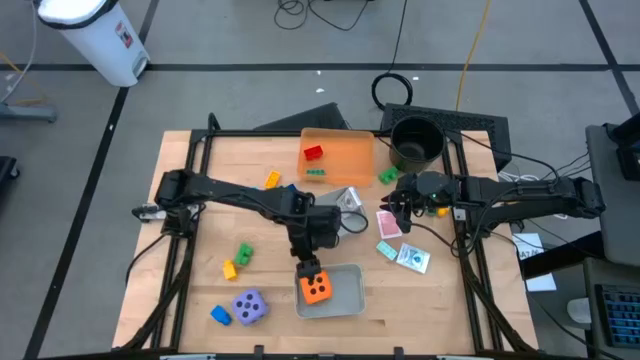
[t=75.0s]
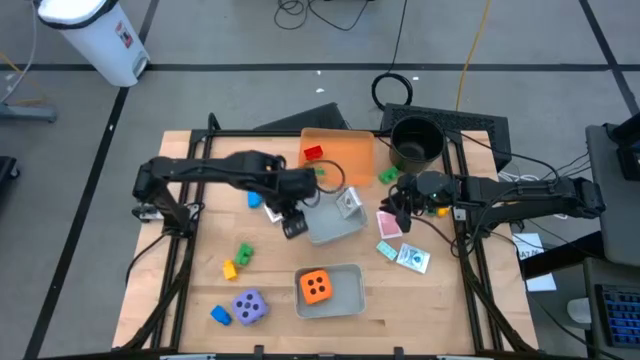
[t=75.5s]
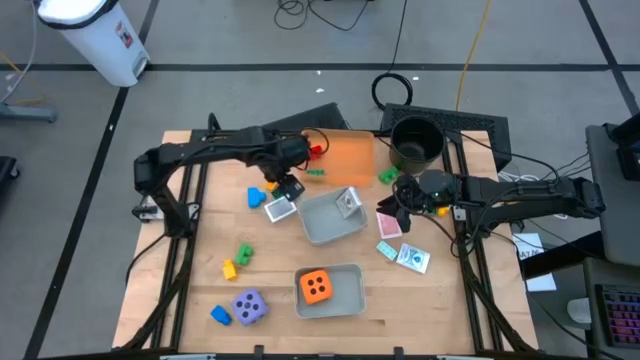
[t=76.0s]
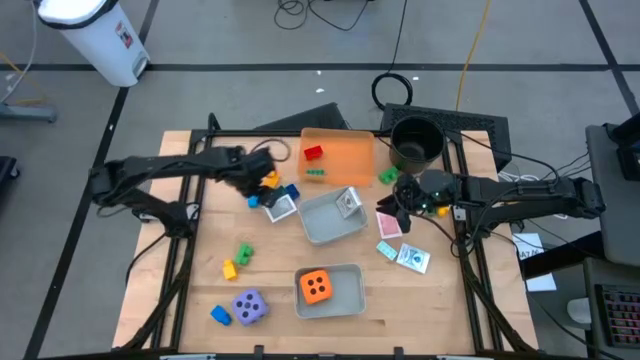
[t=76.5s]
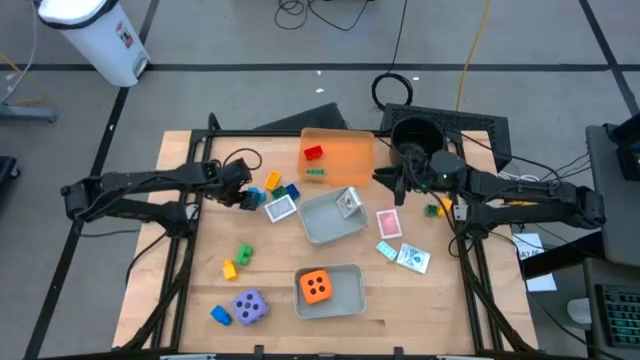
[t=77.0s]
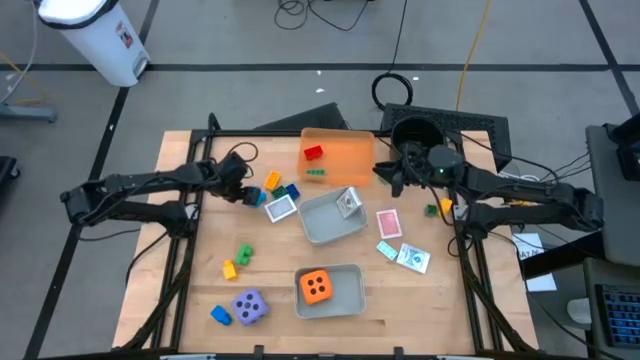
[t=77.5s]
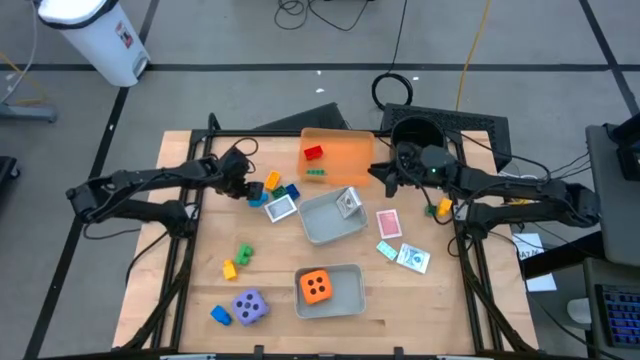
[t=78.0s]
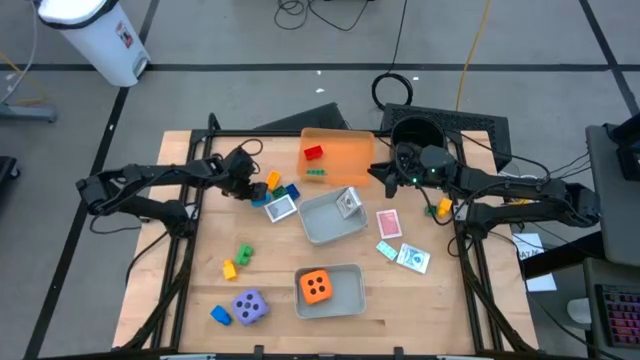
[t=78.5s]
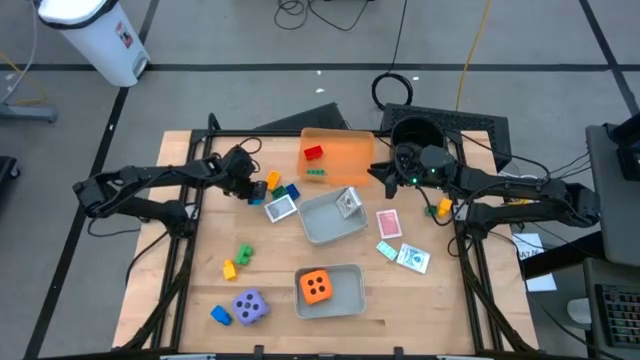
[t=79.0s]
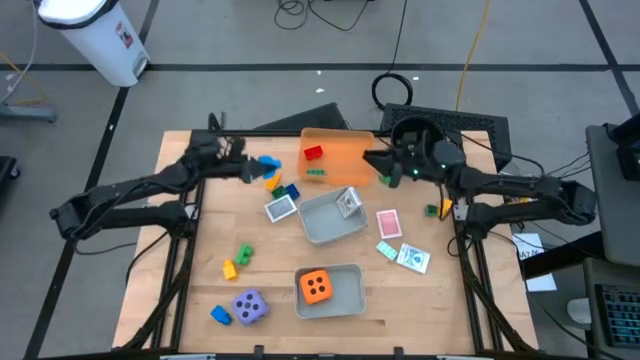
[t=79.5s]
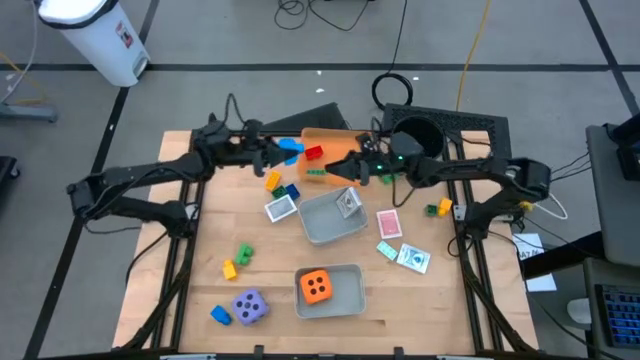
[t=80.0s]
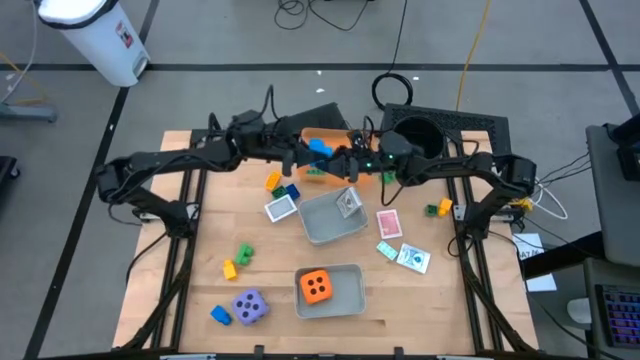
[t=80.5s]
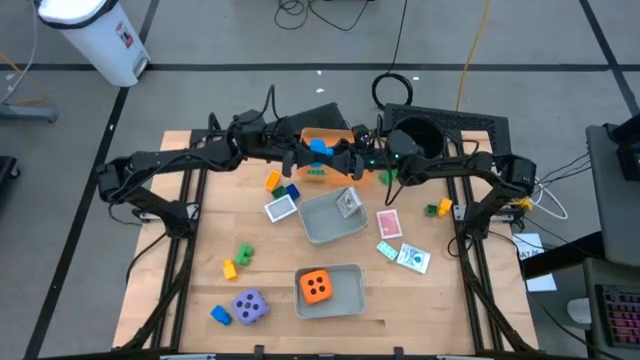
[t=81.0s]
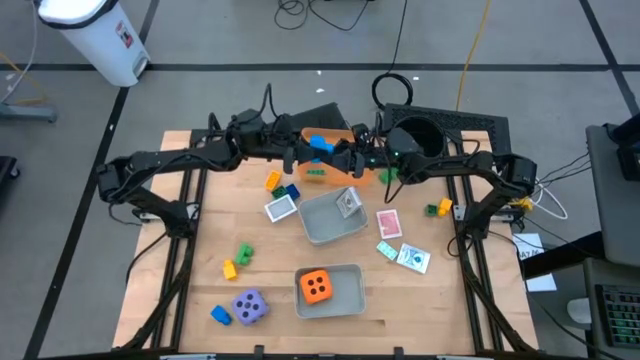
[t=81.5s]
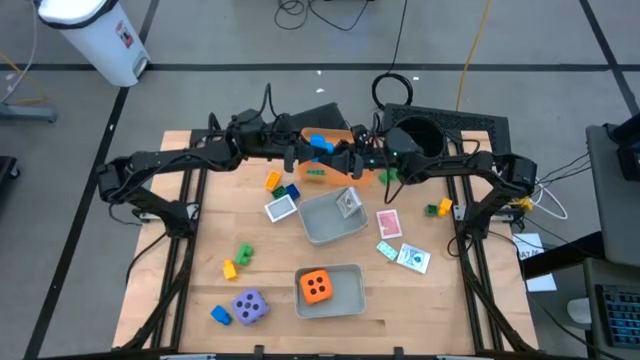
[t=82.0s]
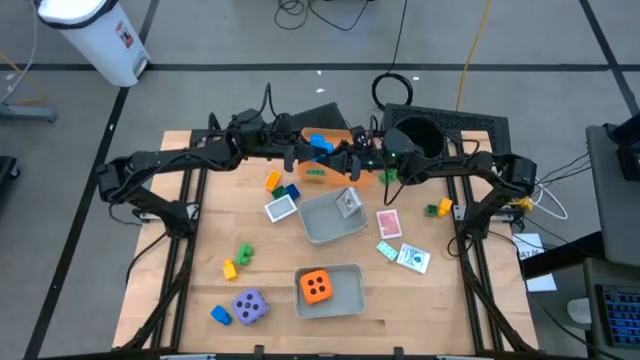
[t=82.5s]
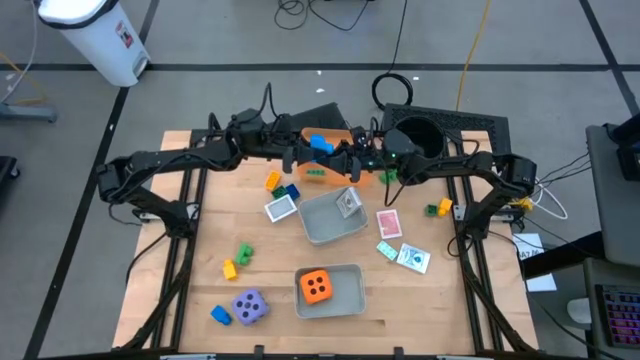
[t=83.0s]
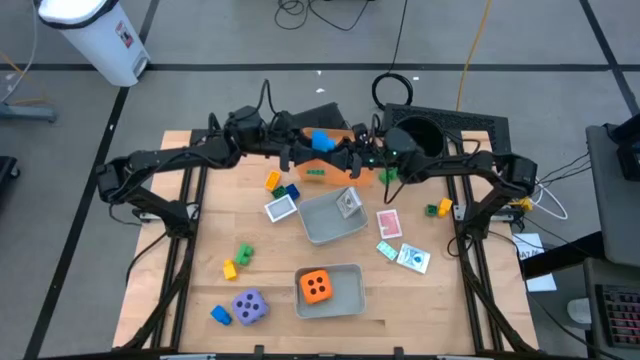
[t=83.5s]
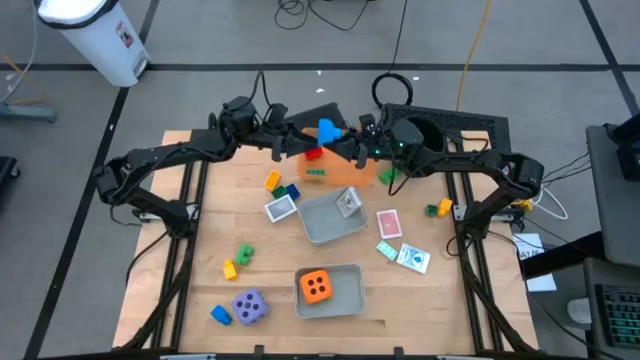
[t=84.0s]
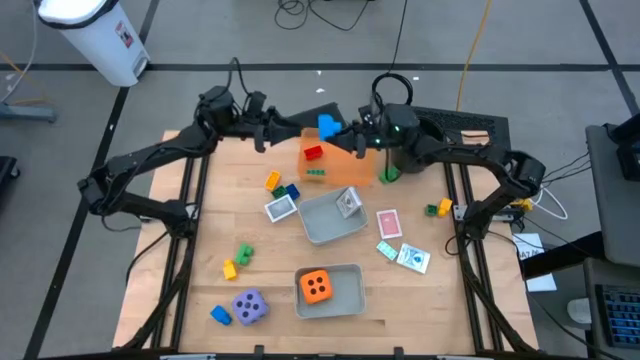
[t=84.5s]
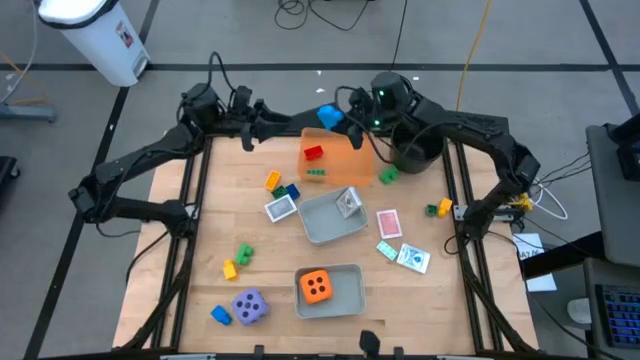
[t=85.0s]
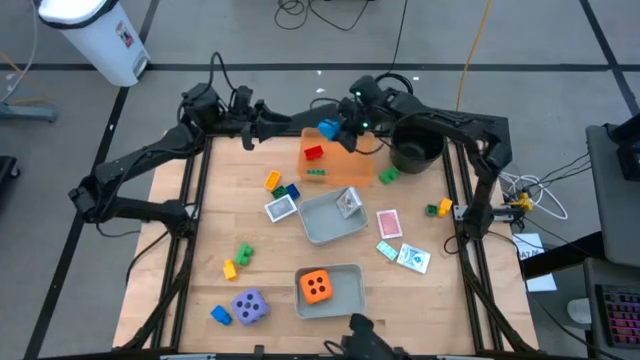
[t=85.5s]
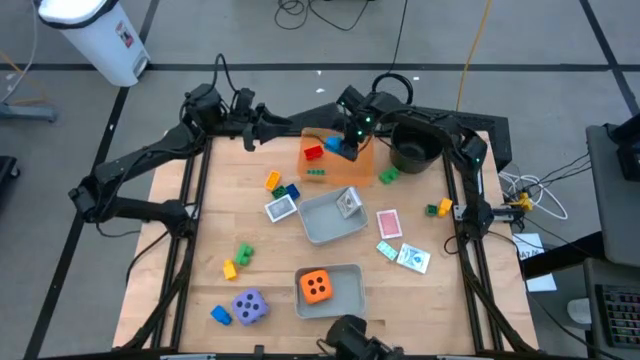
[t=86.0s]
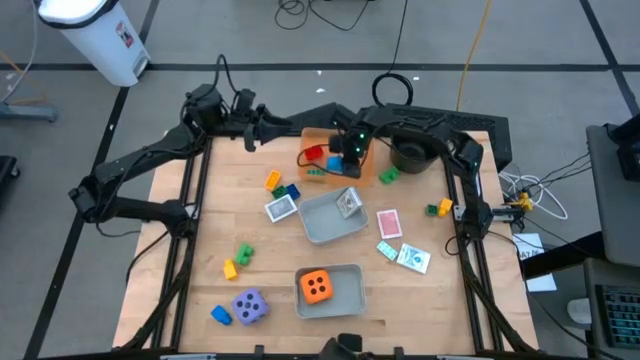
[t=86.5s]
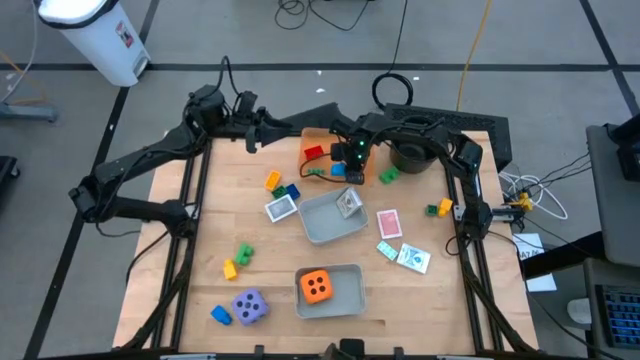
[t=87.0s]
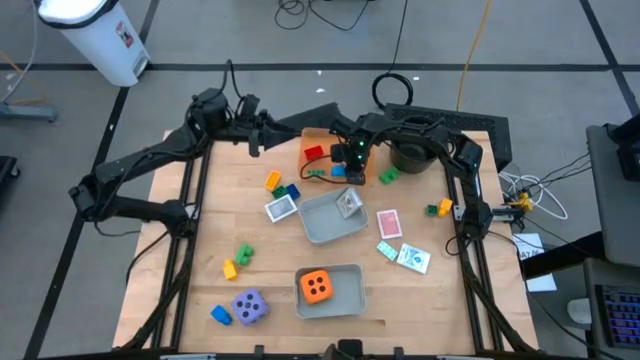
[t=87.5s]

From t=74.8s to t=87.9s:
Task: Pick & Place Toys
Put the blue game piece into the orange bin

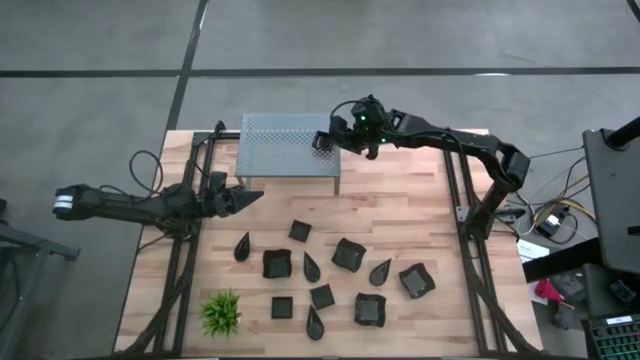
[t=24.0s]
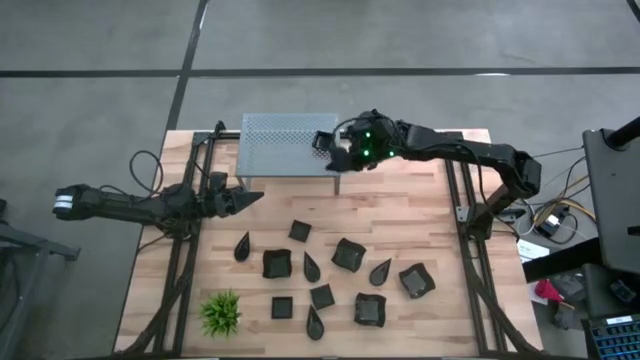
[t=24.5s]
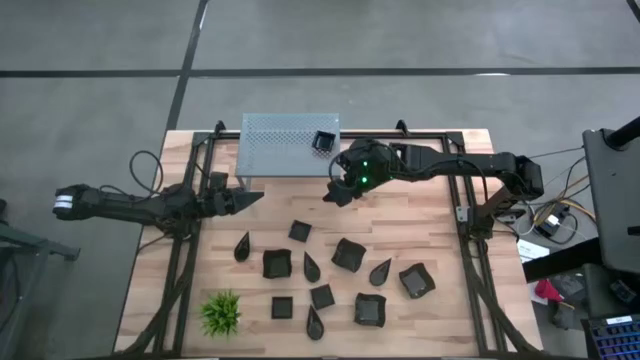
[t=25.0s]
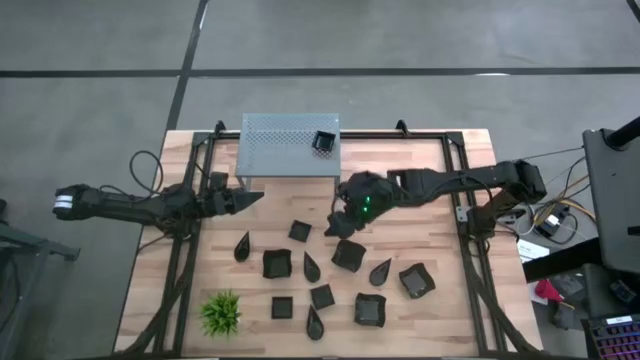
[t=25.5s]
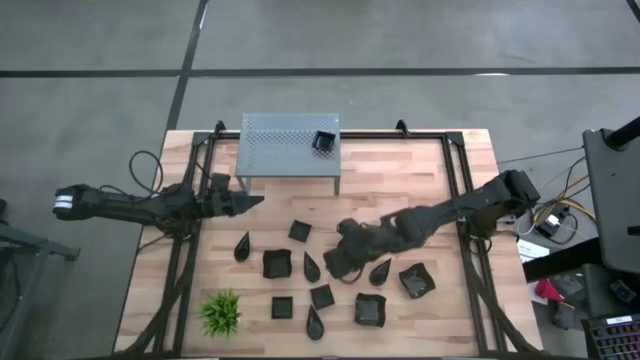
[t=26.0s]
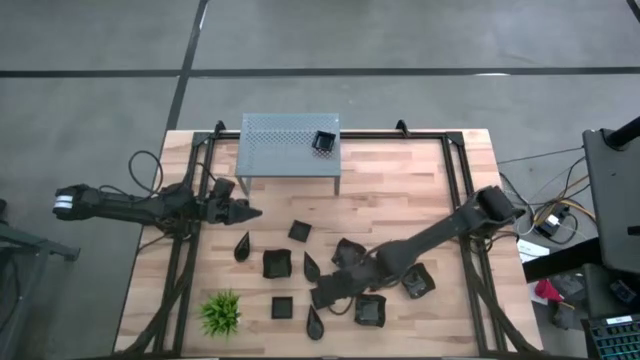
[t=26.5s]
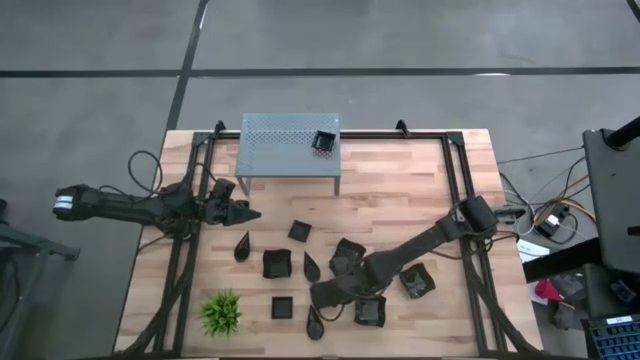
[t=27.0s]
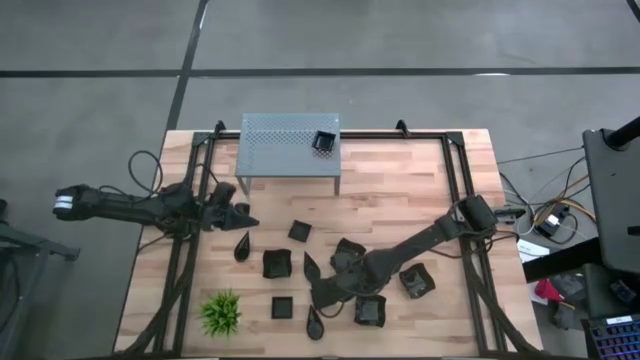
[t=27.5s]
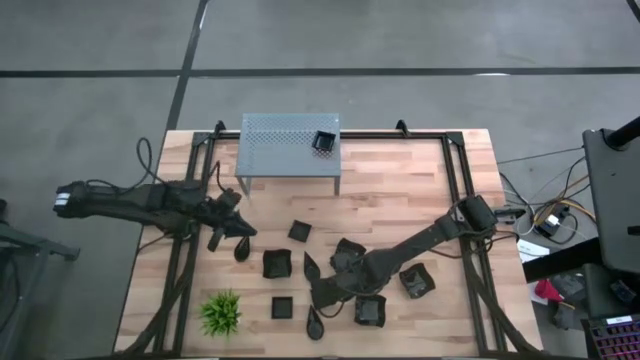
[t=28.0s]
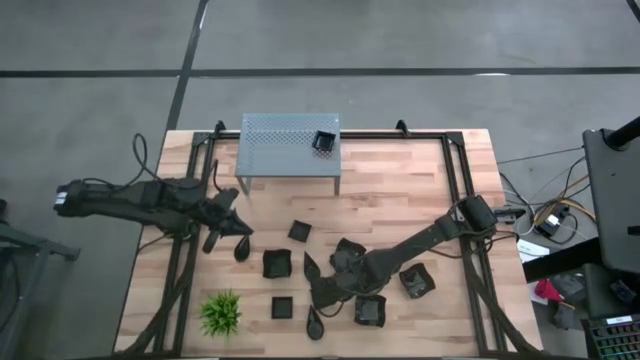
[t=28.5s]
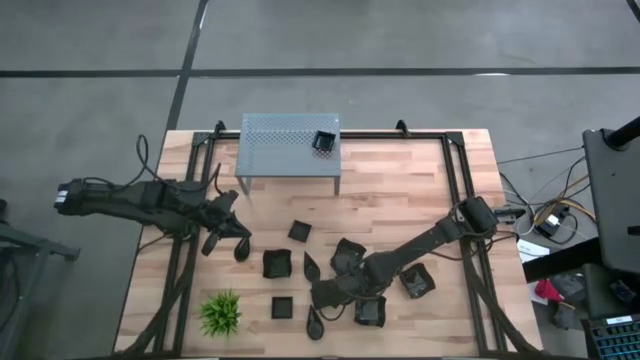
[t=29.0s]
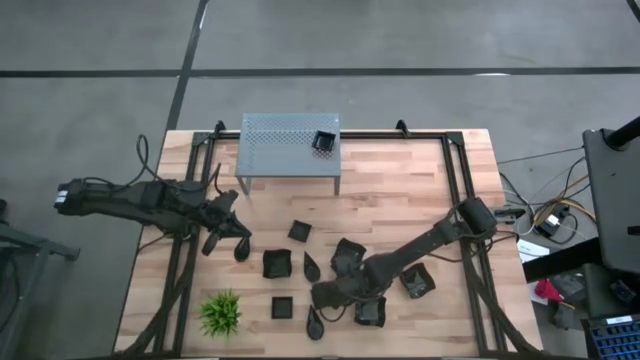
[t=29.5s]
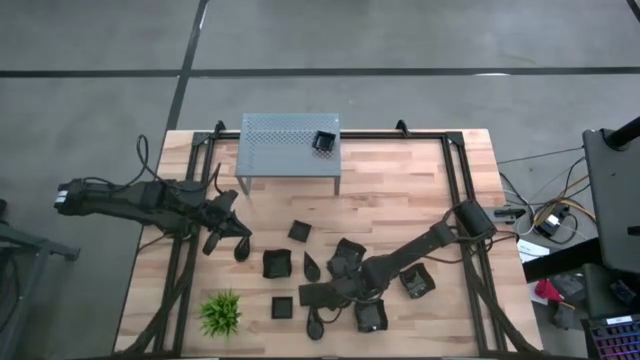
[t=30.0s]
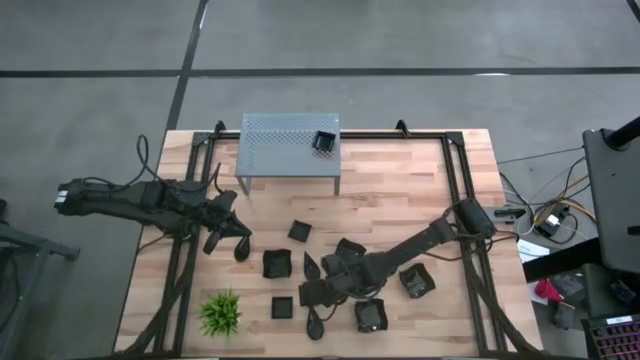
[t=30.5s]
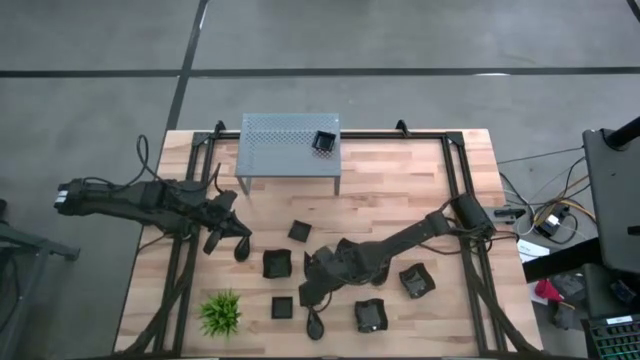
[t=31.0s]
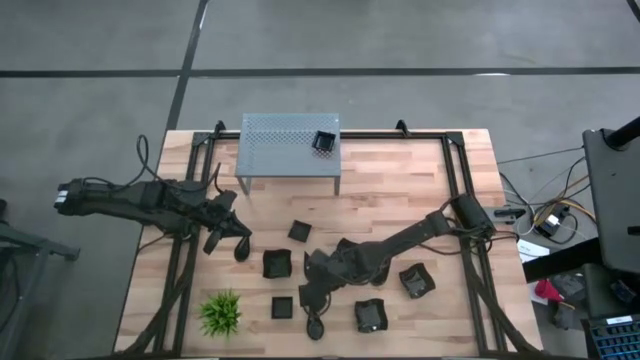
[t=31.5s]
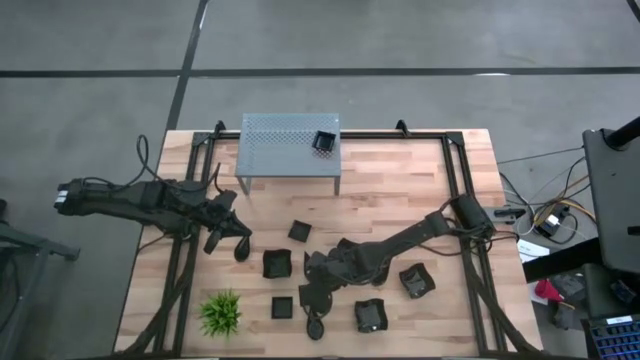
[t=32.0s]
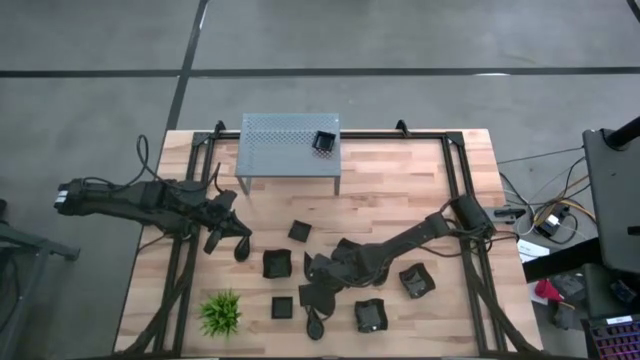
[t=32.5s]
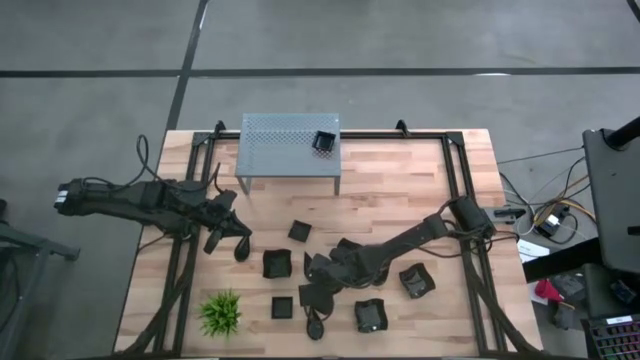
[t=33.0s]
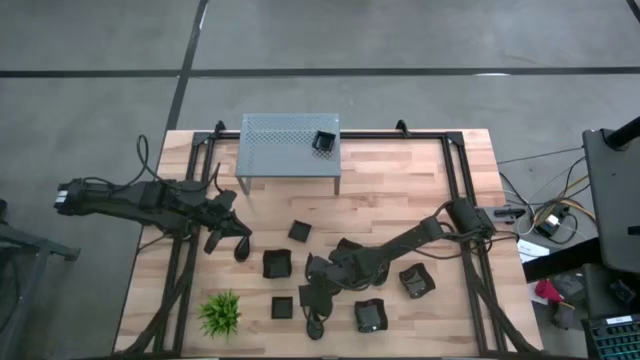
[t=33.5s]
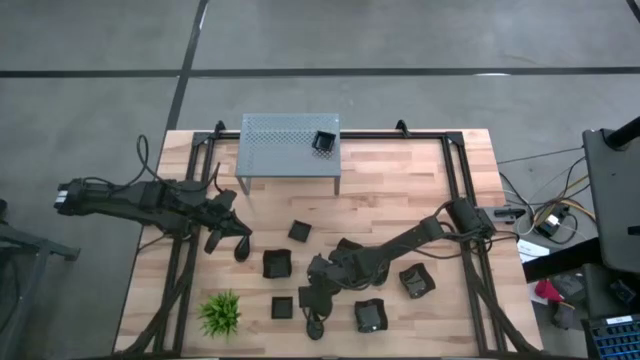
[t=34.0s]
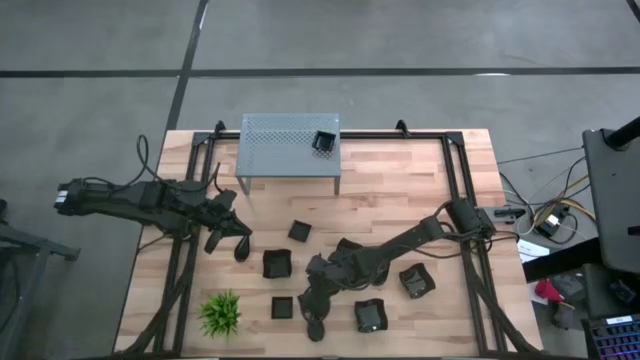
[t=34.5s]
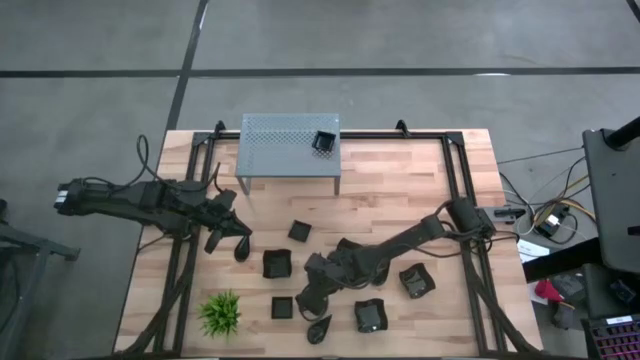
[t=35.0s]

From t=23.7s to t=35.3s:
Task: Pick & Place Mini shaped plates
Stack the square plate on top of the other square plates on the shelf
